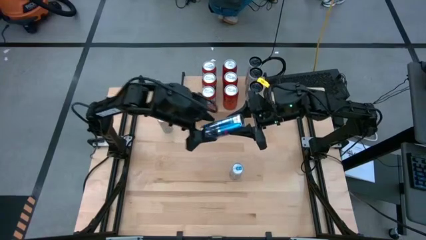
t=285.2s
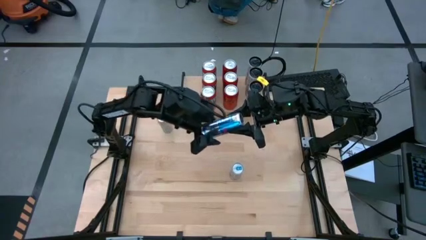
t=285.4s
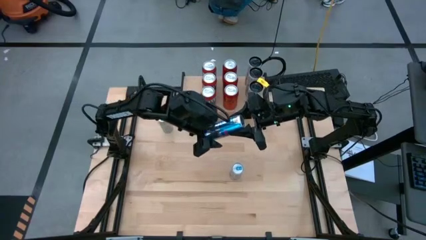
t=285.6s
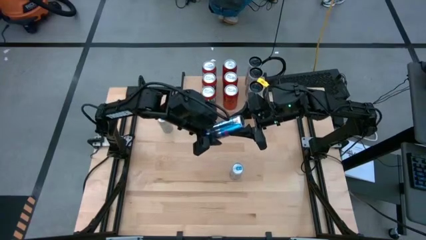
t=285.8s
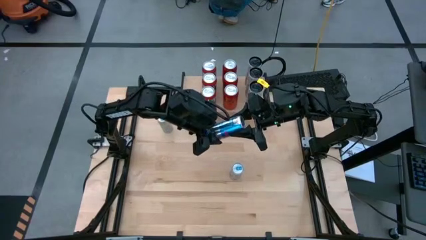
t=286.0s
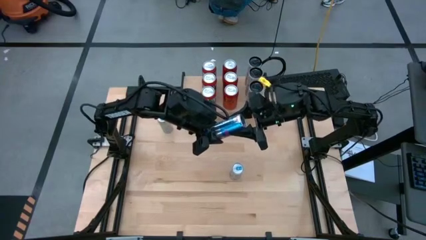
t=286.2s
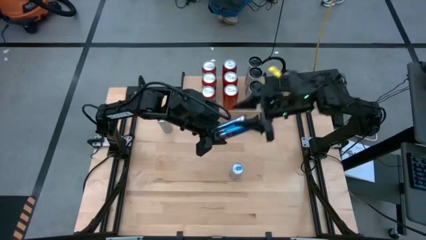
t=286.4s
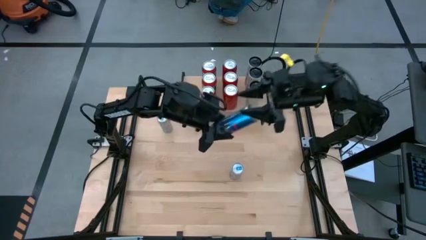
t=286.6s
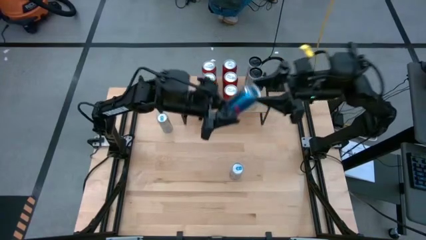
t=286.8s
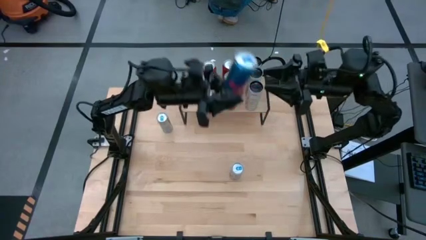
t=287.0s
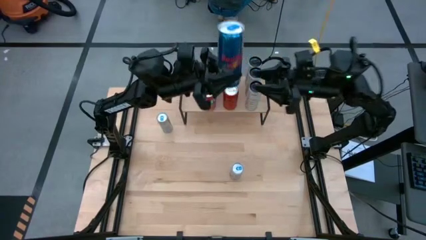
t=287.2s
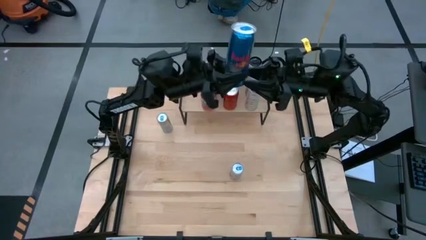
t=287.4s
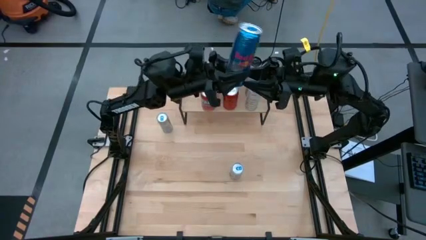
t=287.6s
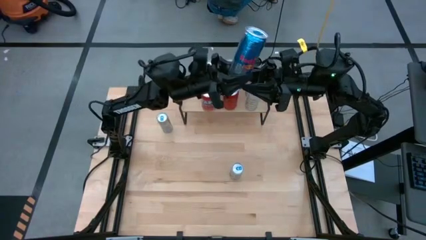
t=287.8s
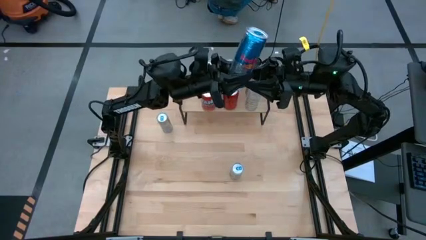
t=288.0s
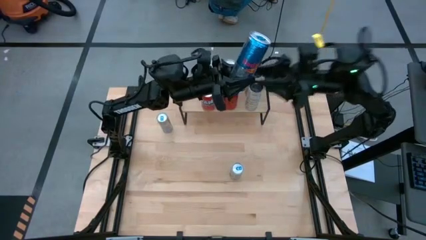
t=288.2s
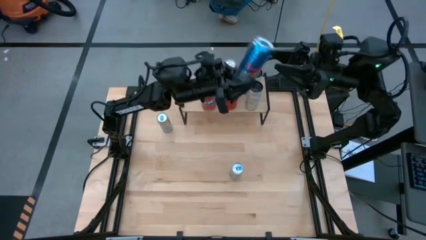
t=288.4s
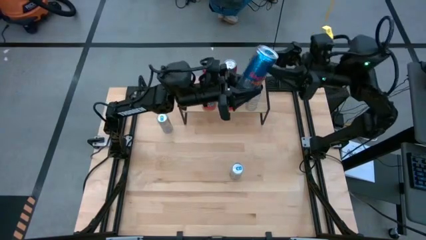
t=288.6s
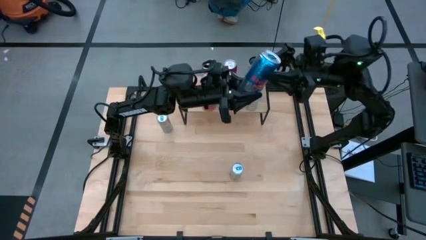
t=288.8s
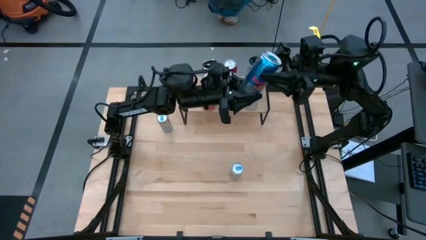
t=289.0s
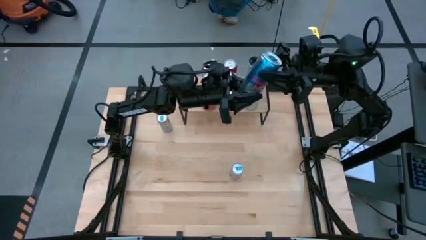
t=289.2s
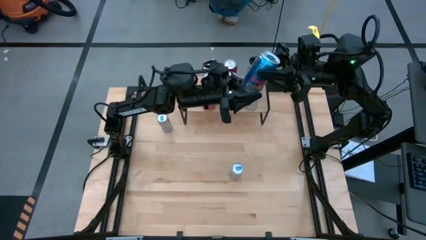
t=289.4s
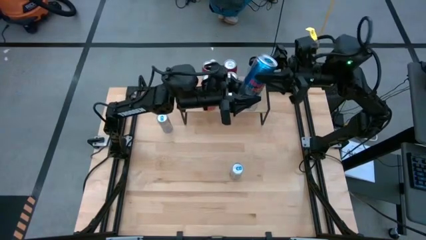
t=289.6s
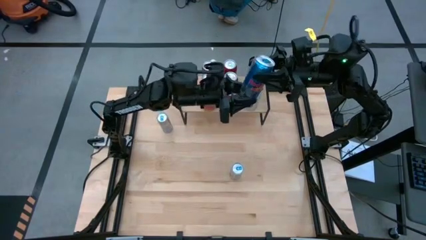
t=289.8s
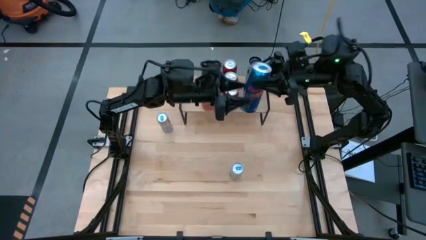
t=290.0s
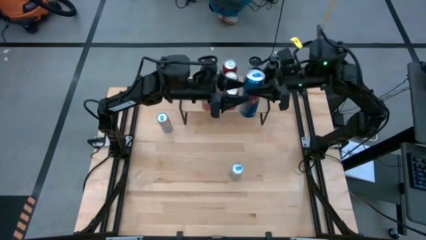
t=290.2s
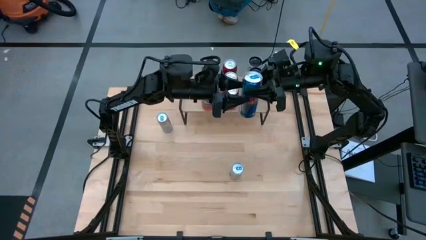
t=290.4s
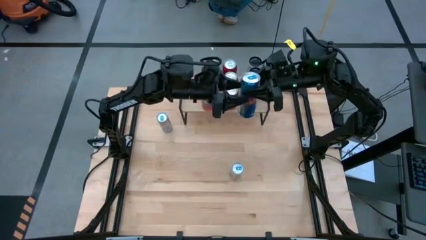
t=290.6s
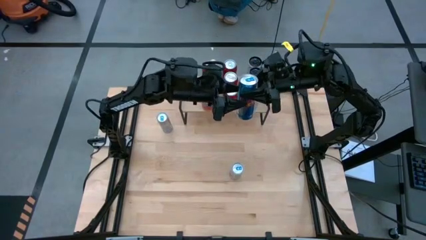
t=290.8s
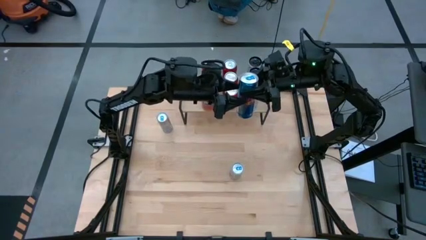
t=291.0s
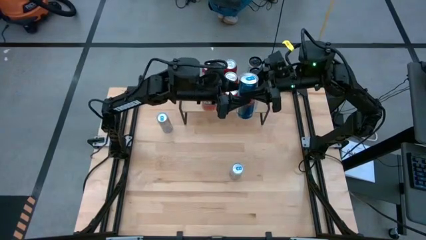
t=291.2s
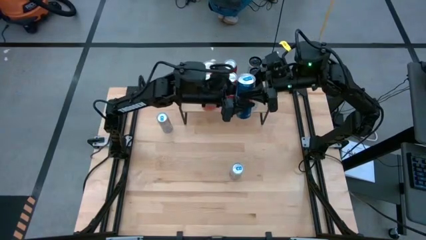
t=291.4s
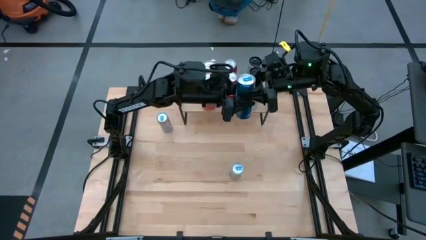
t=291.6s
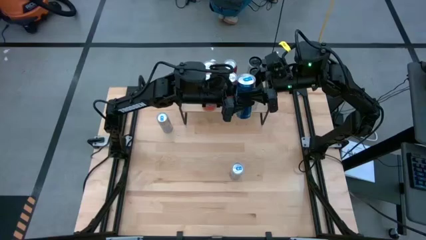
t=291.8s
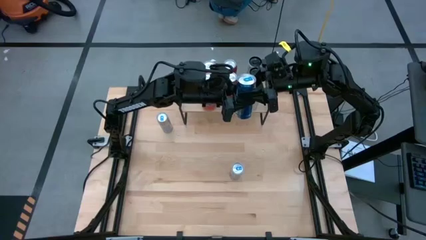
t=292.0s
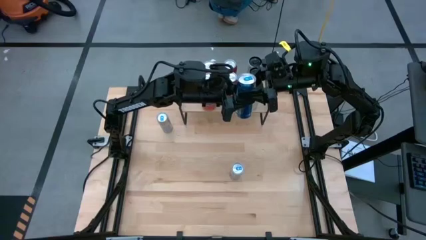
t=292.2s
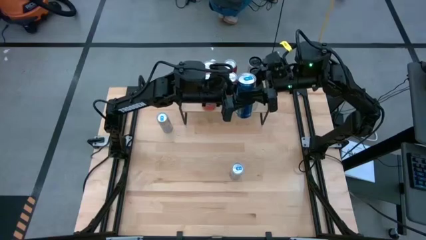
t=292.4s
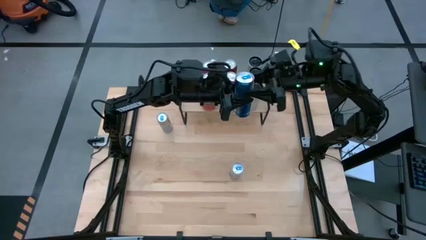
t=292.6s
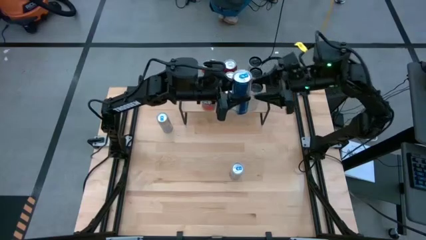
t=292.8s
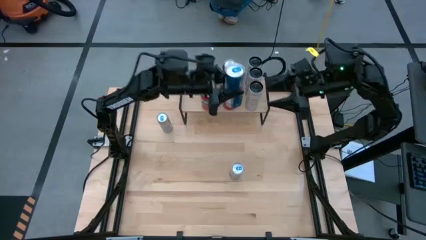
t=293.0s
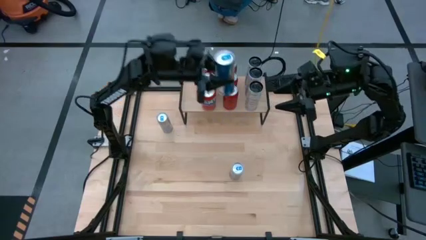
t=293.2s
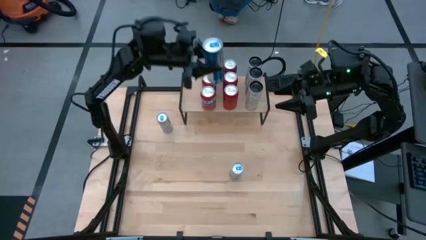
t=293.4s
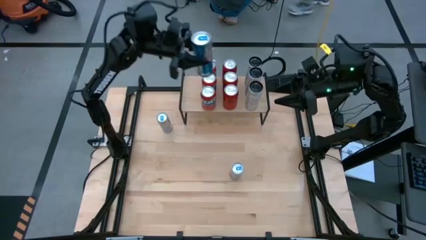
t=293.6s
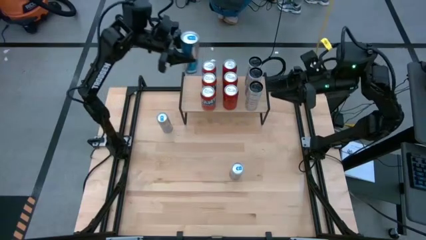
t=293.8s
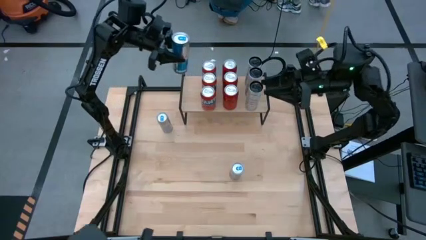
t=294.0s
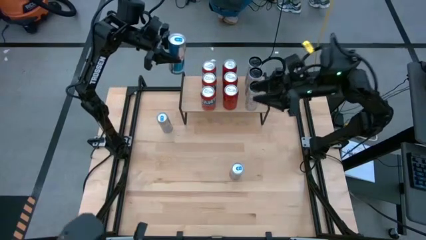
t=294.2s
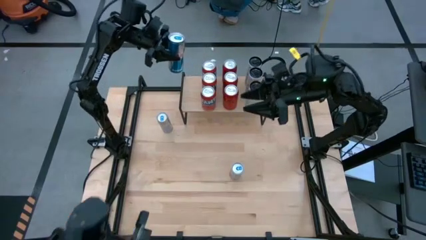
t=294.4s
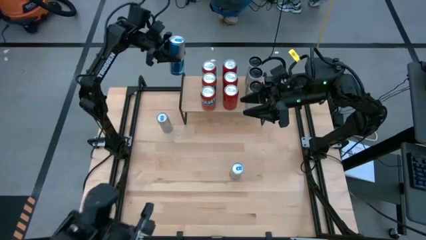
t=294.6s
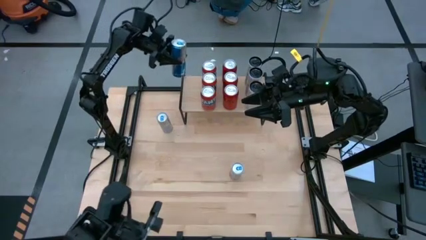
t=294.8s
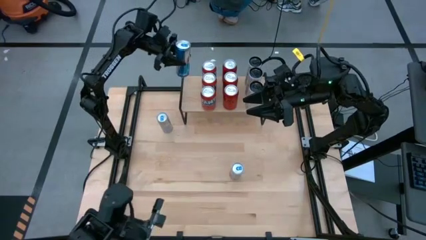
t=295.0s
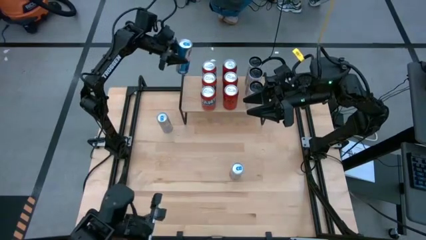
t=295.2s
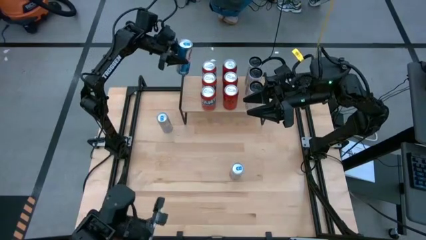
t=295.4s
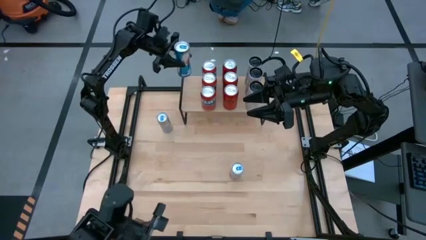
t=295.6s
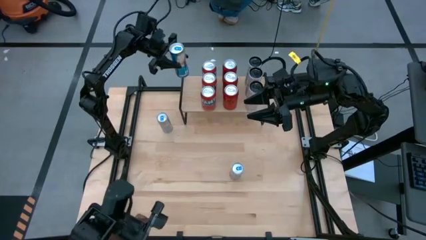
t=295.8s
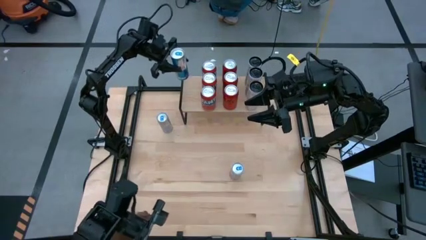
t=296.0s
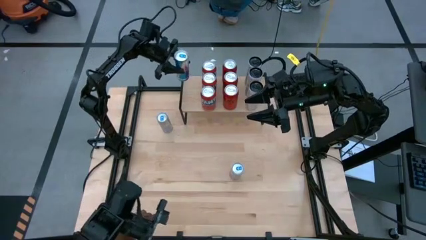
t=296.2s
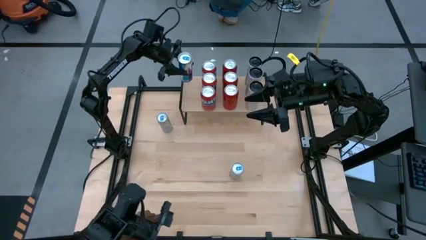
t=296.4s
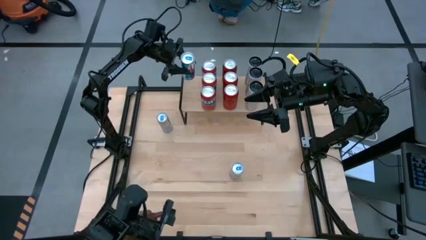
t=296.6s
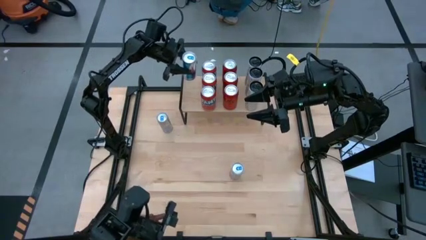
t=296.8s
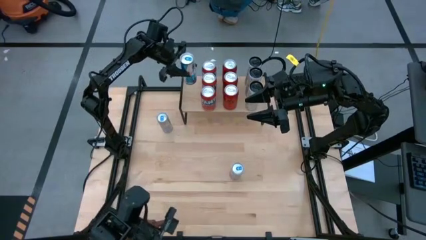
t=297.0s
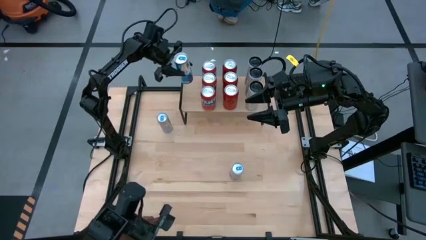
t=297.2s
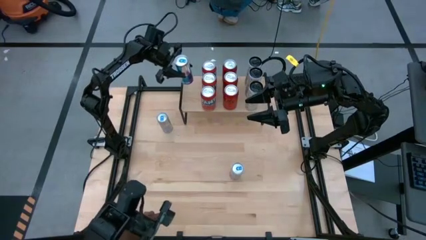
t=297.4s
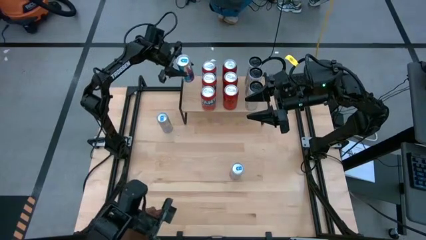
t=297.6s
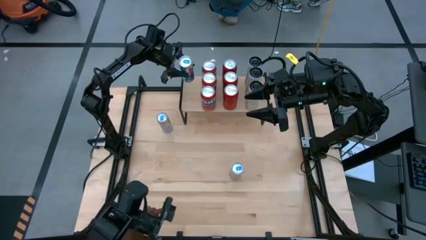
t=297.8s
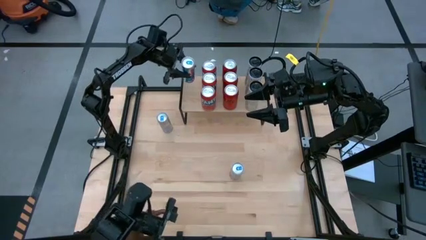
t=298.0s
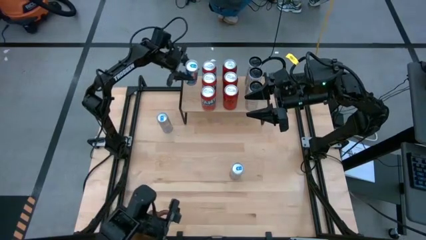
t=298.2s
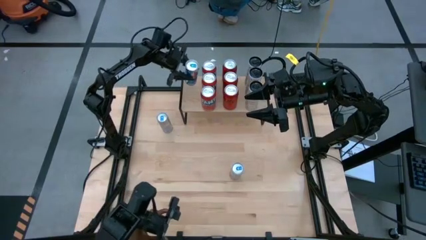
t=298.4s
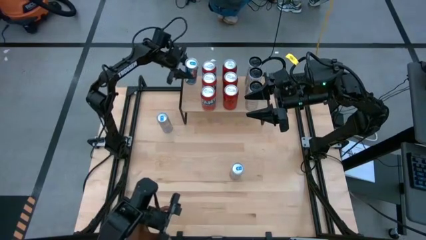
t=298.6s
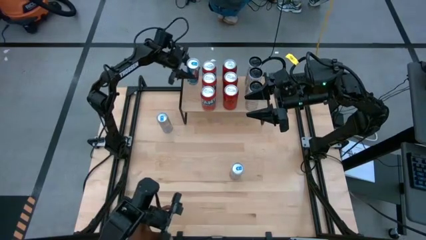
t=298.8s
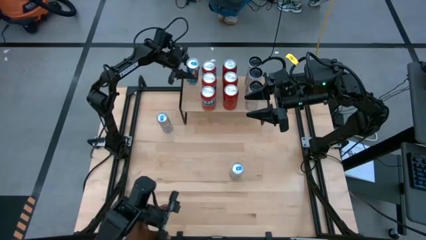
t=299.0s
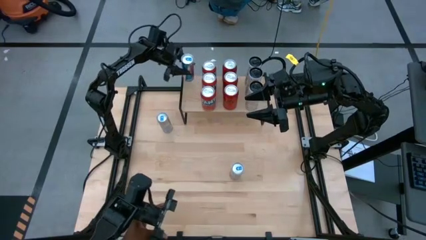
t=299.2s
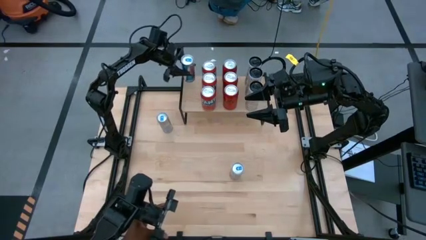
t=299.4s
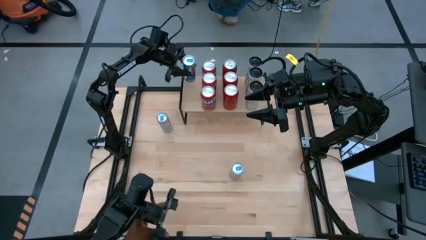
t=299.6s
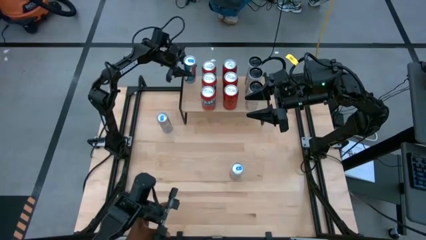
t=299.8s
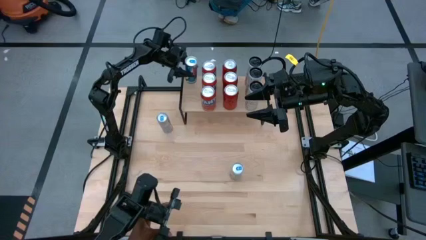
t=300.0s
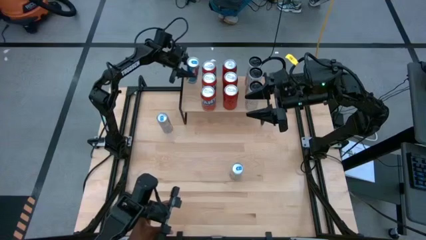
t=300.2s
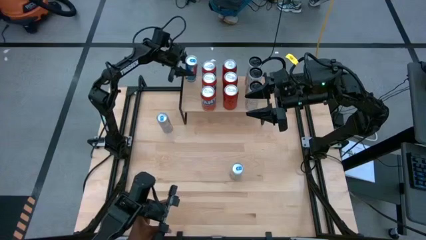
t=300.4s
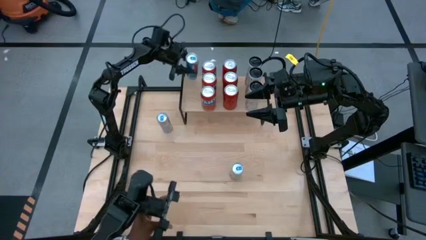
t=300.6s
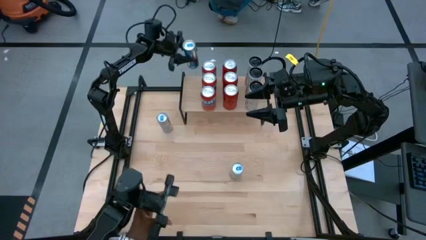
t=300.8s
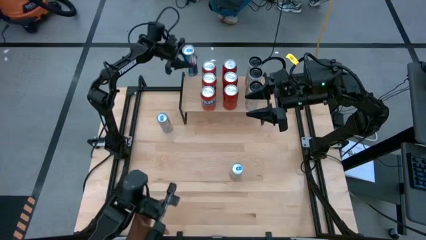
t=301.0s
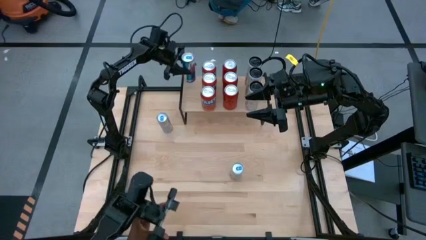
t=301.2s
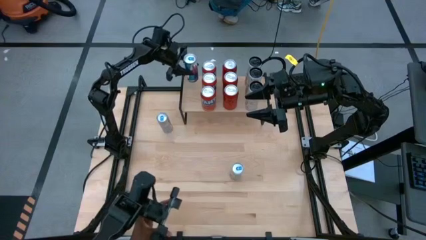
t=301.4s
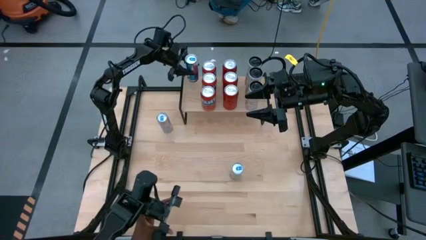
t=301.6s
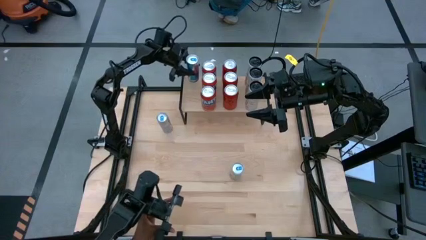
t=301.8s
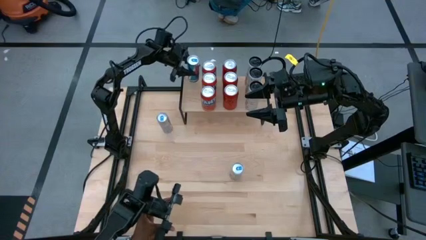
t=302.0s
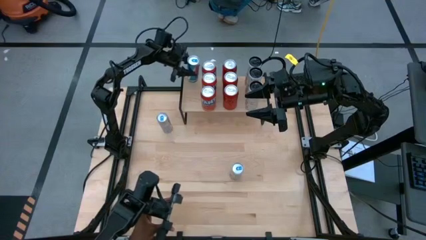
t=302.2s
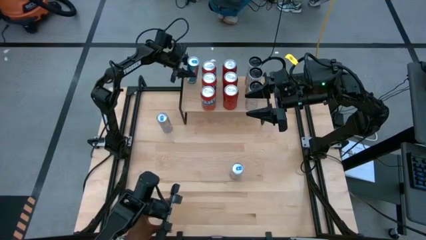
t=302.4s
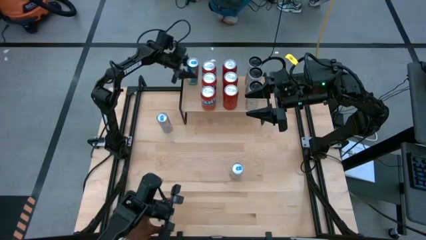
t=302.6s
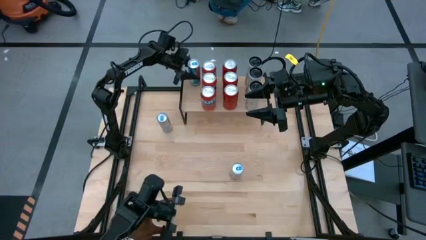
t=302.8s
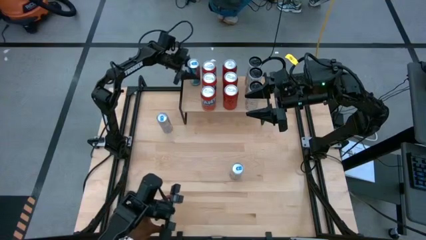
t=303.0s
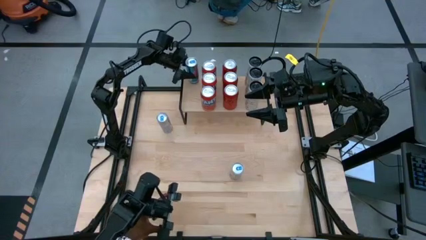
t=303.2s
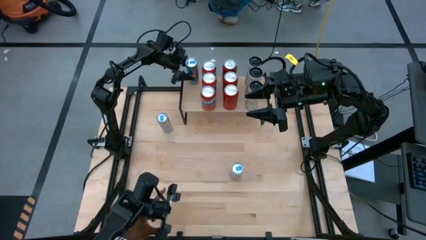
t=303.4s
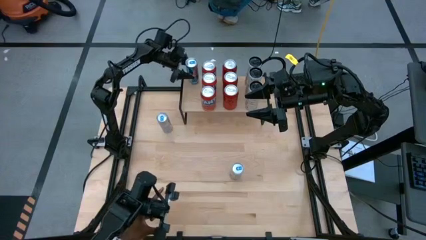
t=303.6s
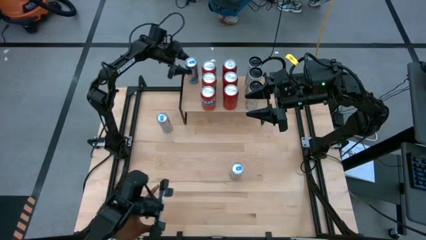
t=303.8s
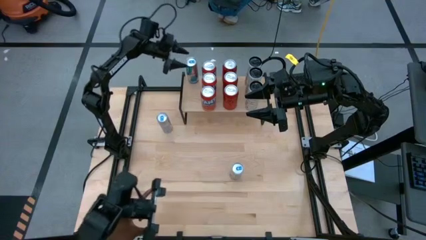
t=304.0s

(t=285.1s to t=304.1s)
Task: Place canned beverage on shelf
Put the top right blue soda can on the shelf
